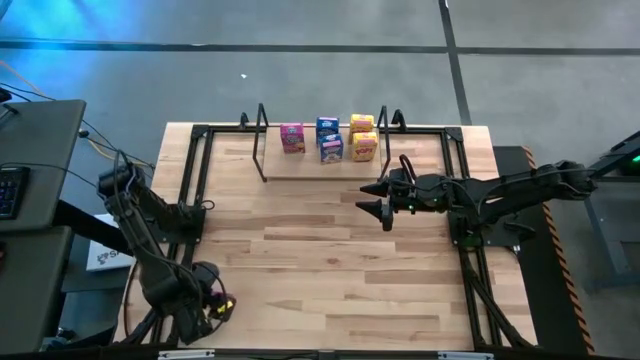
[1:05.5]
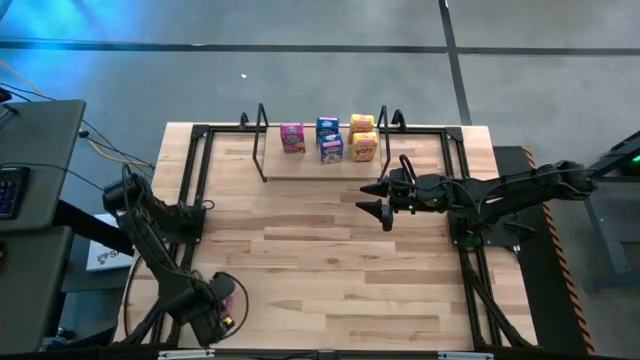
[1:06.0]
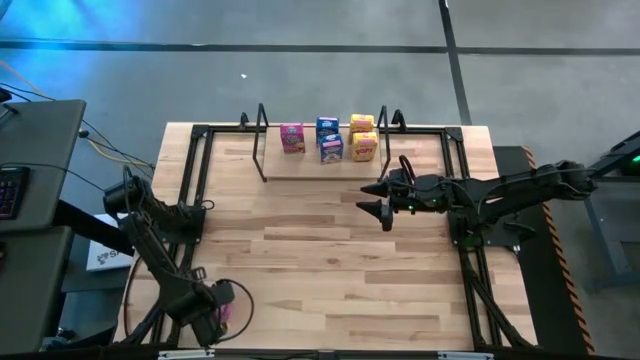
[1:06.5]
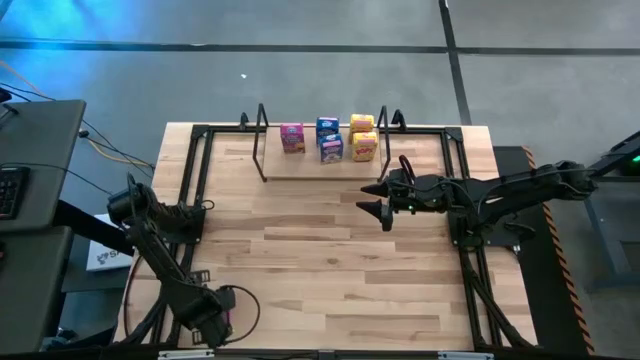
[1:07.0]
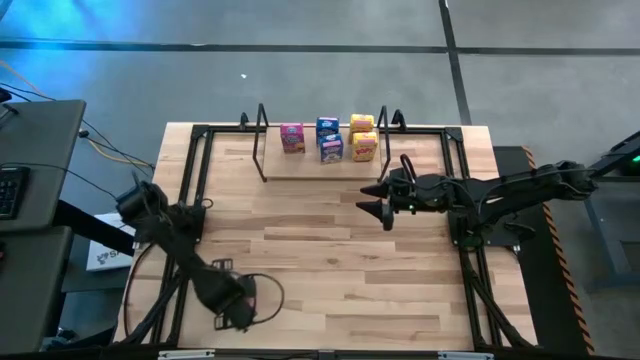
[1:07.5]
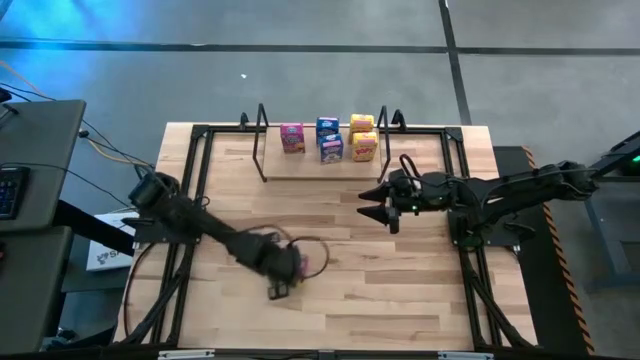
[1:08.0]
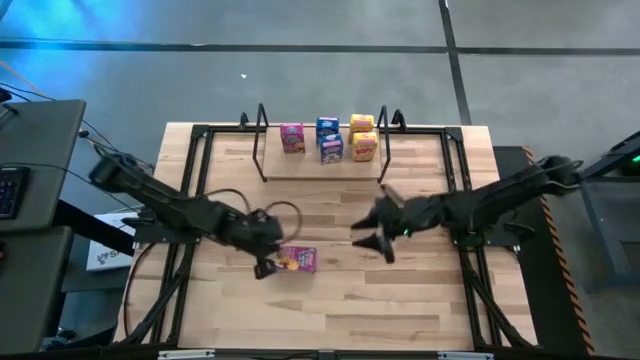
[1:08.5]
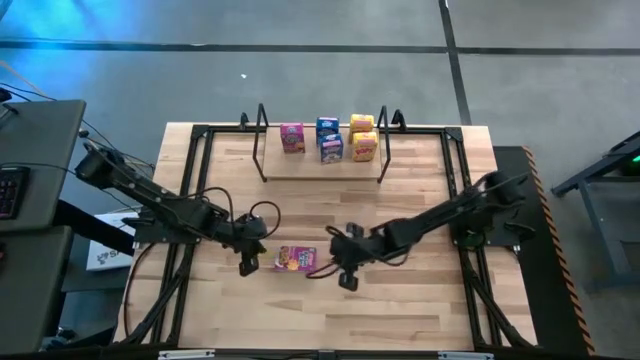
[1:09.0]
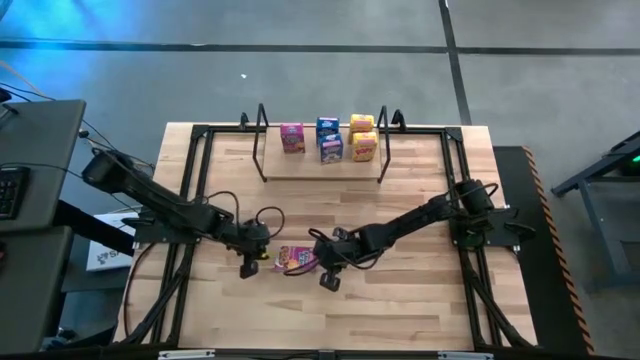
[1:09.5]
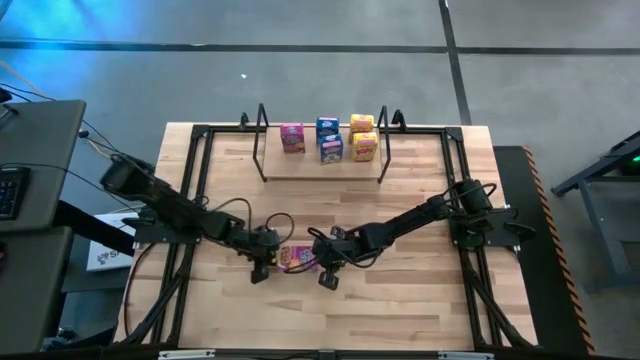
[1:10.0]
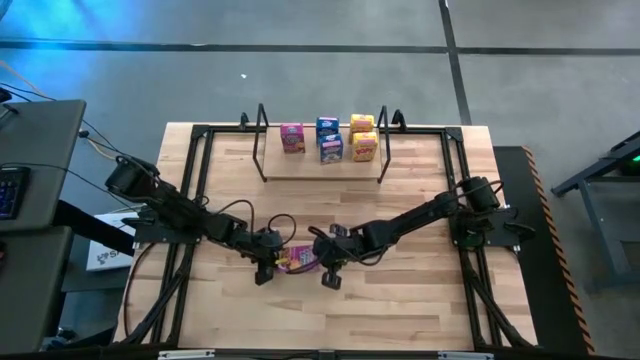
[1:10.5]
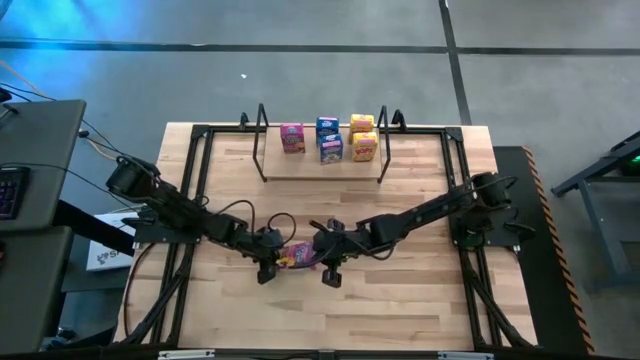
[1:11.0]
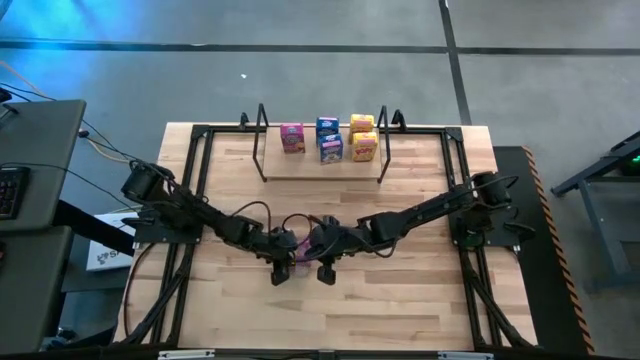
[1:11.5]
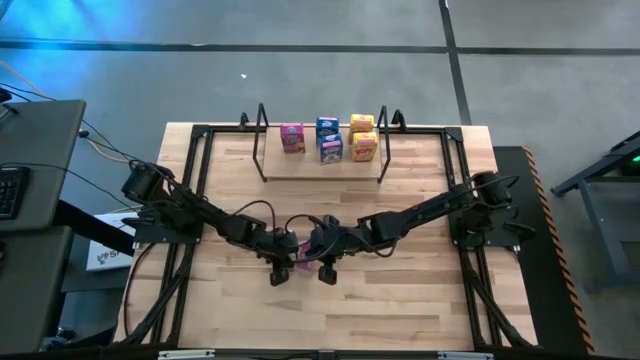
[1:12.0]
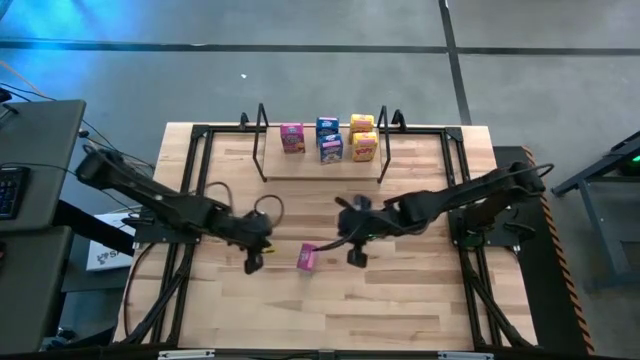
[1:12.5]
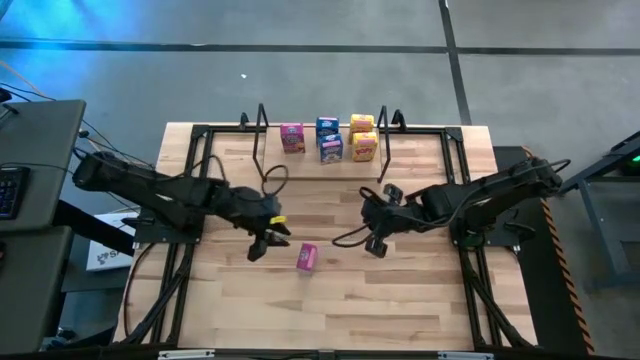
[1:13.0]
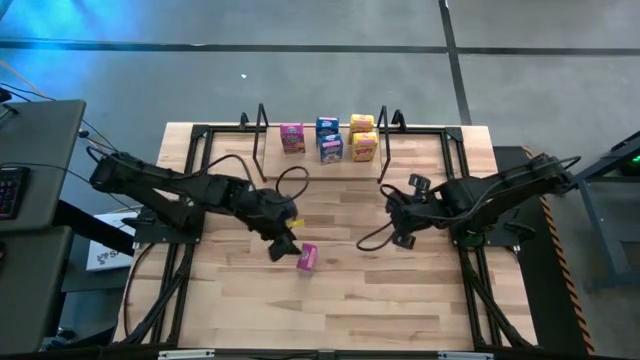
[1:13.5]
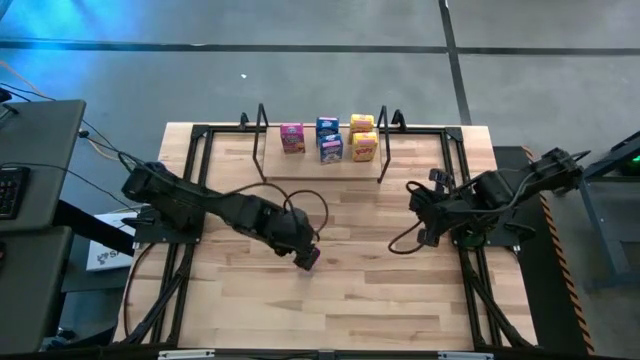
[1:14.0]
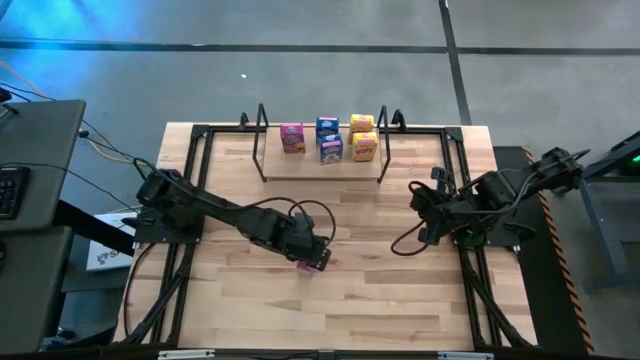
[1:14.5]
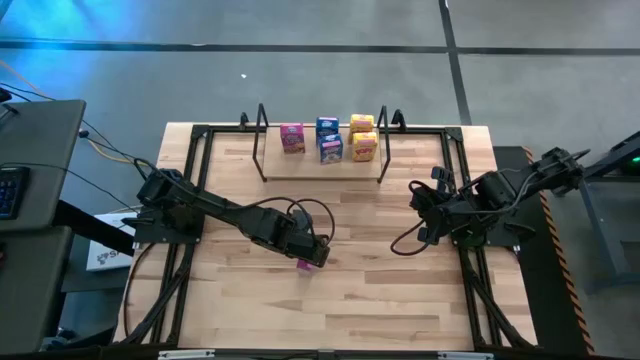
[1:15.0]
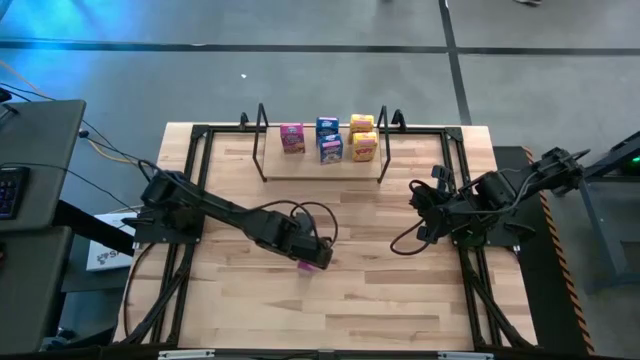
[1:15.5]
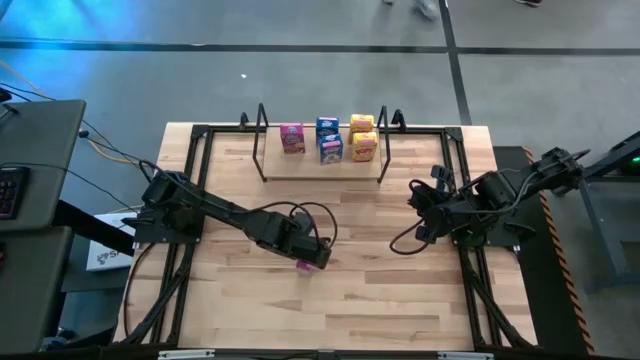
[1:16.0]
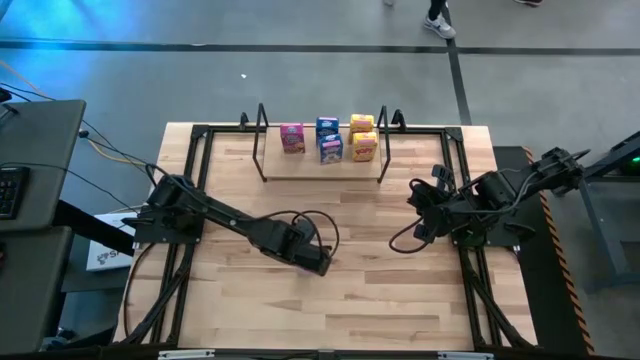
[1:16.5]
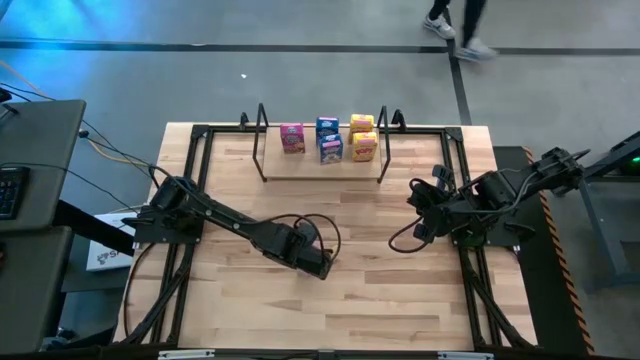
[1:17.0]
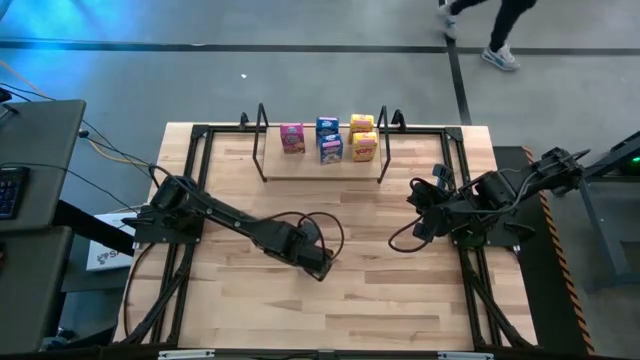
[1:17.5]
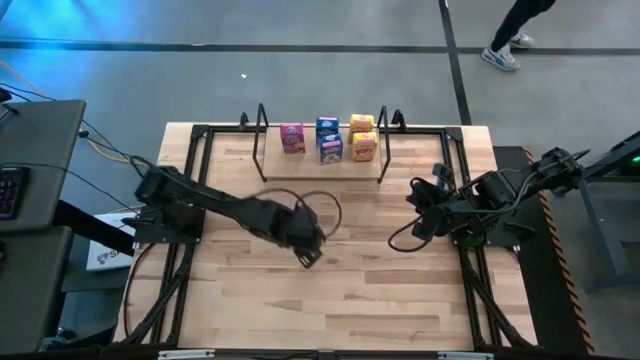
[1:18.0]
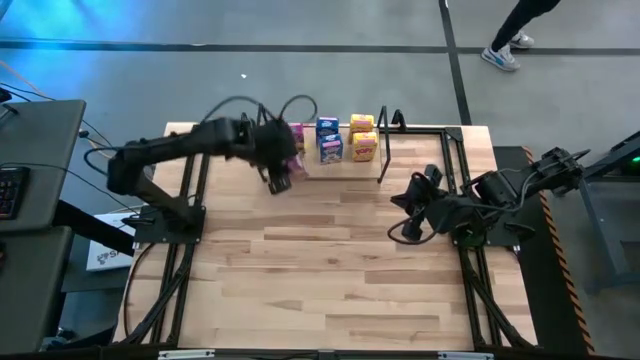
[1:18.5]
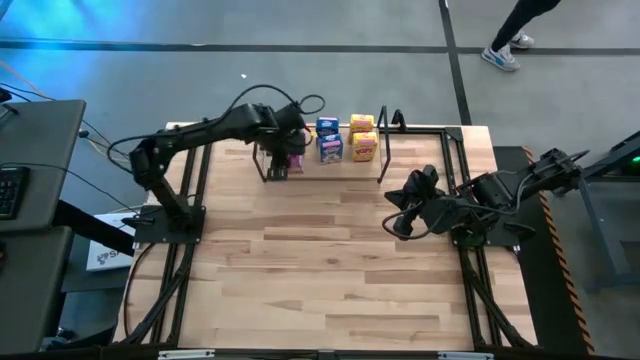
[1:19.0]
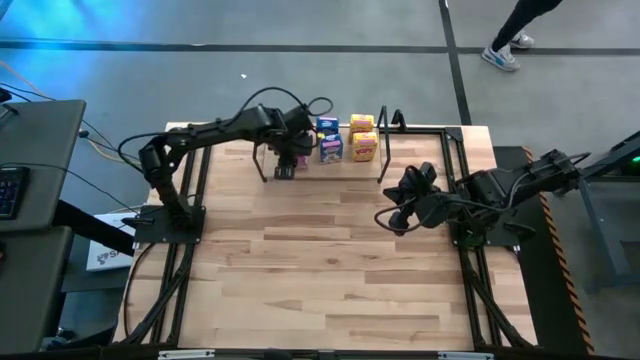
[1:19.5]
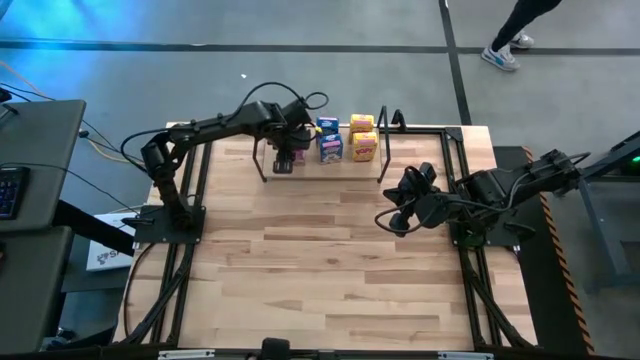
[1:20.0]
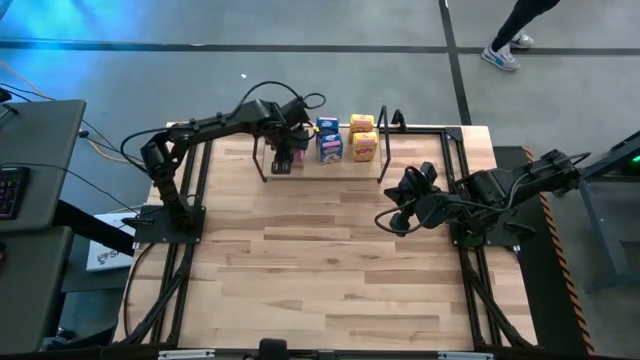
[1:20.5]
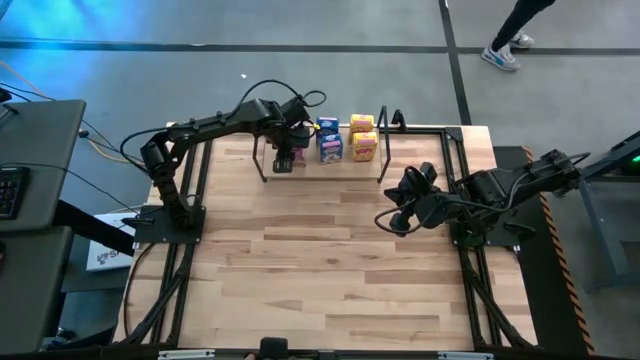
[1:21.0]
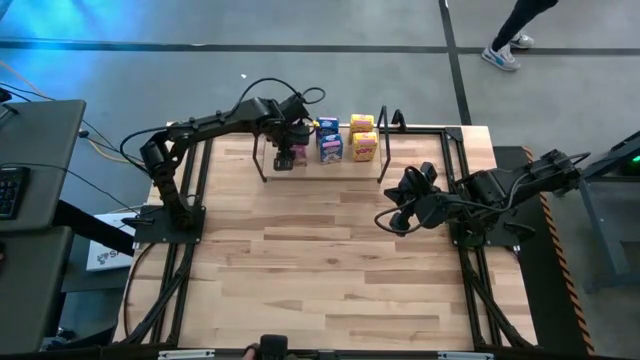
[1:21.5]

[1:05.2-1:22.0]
Task: Stack cereal on shelf
Put the purple cereal box on the shelf aligned with the other purple cereal box

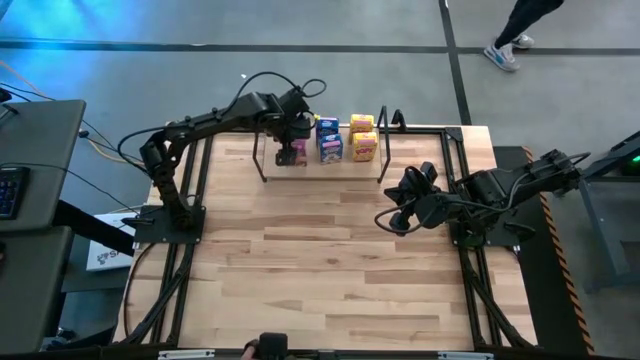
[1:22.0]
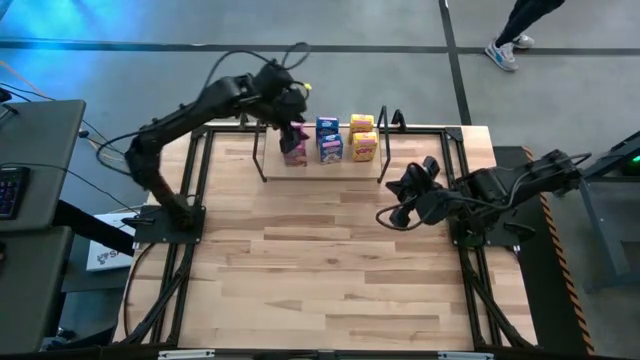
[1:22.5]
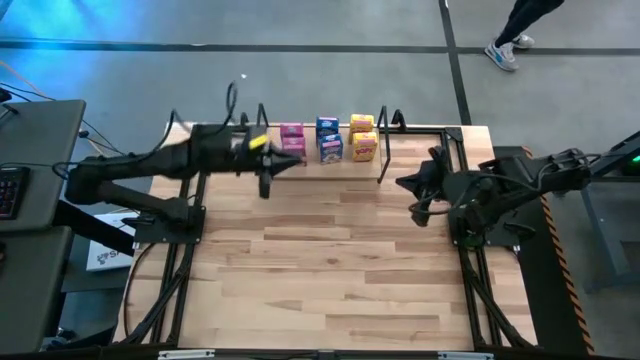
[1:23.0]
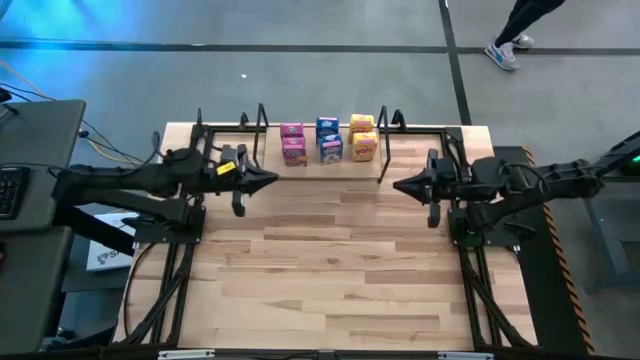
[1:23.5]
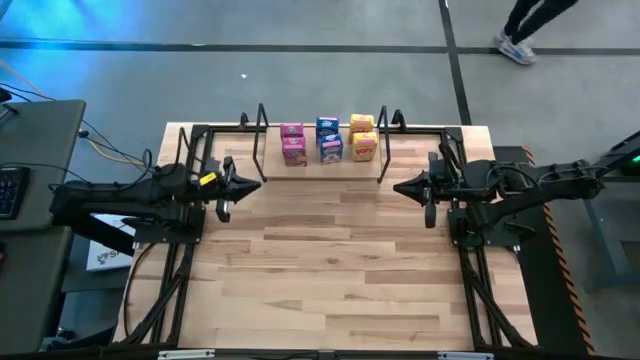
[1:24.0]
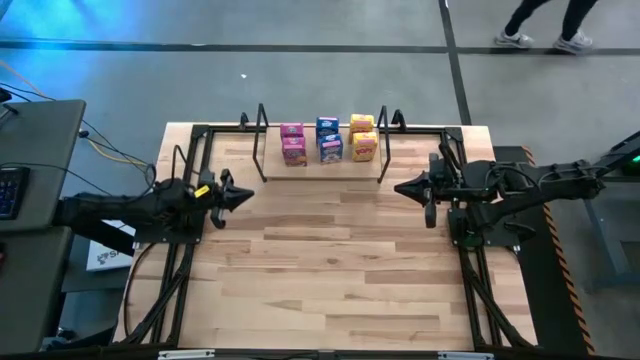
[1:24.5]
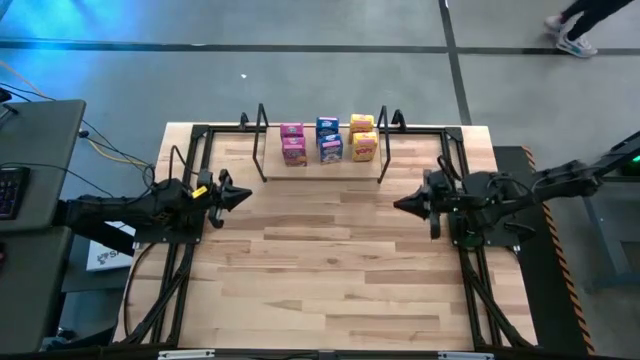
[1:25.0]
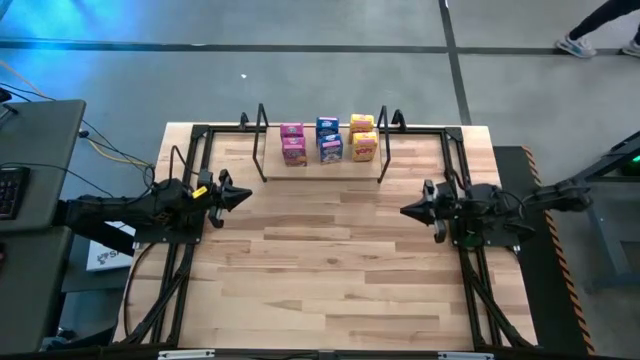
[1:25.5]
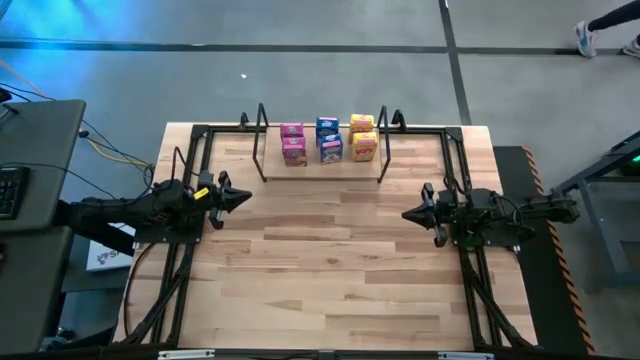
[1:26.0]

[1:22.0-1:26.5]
Return to Home Position
